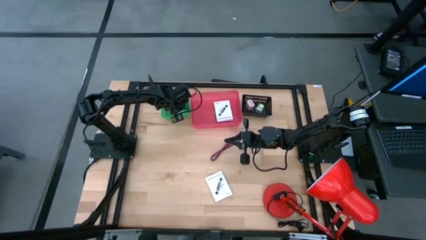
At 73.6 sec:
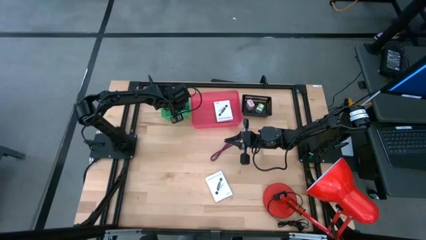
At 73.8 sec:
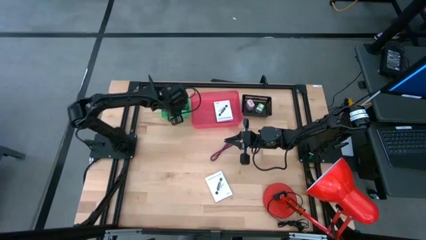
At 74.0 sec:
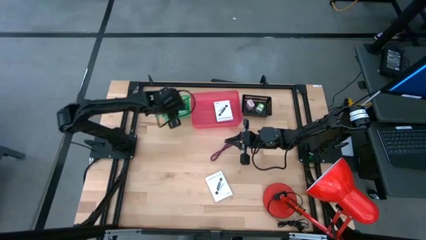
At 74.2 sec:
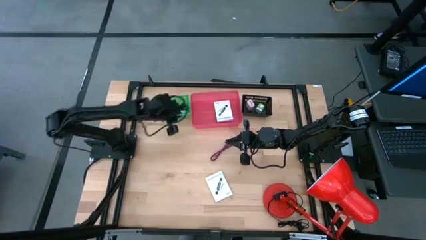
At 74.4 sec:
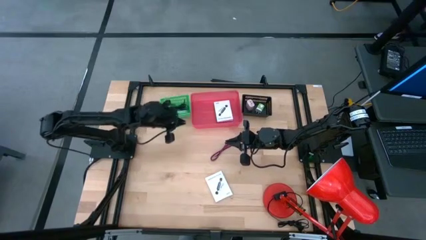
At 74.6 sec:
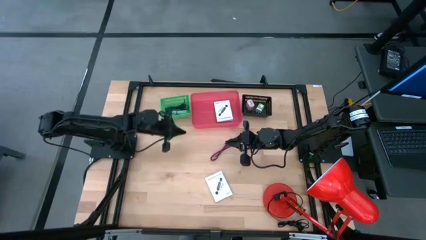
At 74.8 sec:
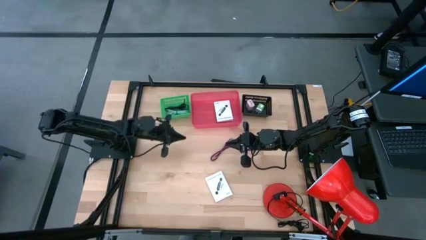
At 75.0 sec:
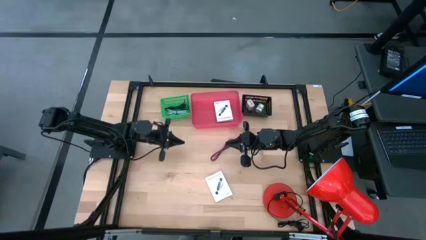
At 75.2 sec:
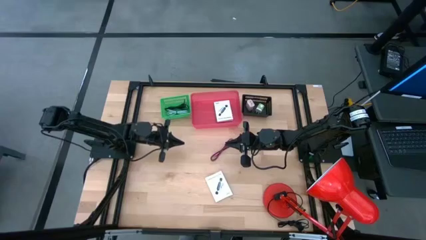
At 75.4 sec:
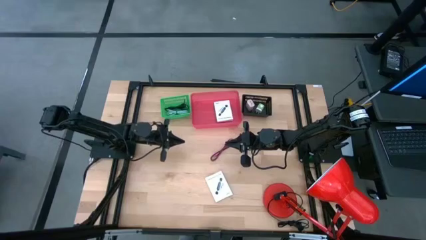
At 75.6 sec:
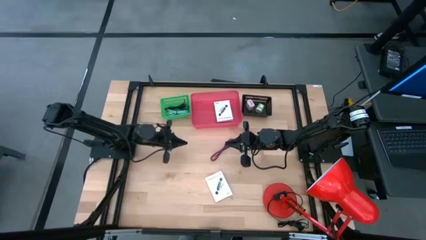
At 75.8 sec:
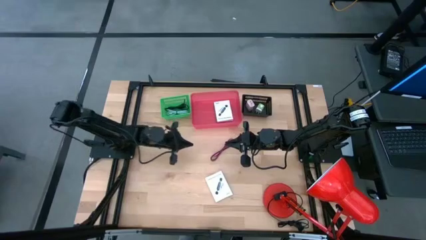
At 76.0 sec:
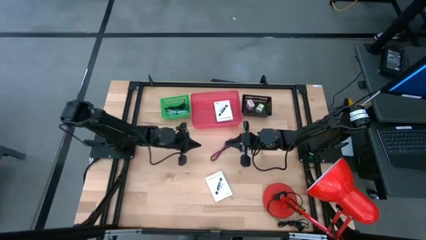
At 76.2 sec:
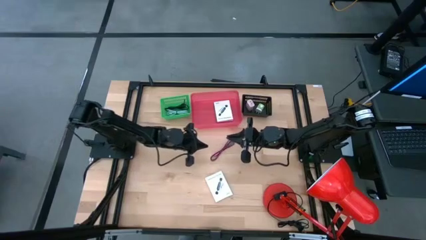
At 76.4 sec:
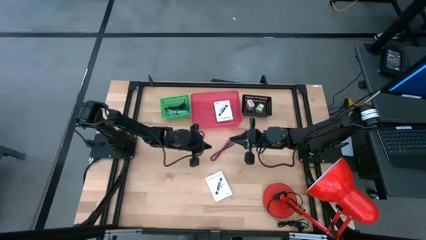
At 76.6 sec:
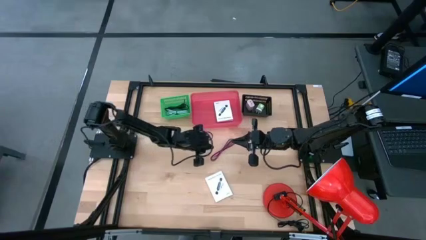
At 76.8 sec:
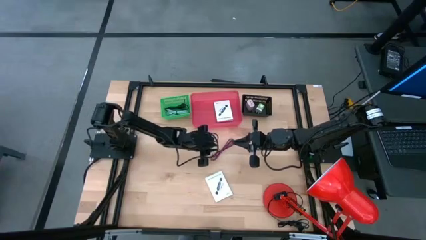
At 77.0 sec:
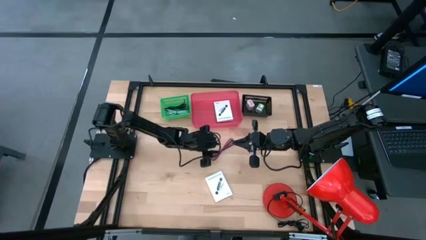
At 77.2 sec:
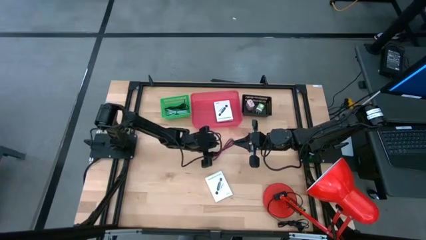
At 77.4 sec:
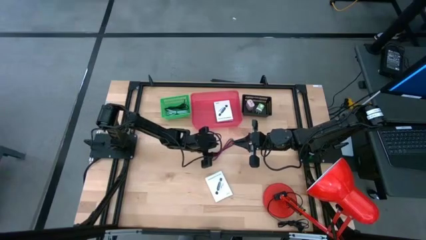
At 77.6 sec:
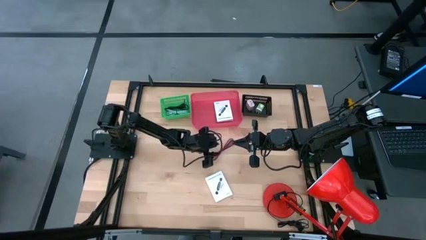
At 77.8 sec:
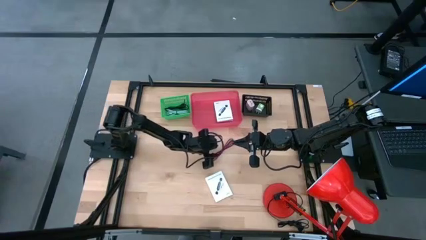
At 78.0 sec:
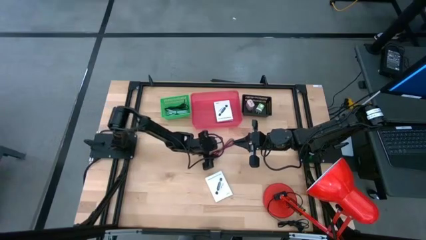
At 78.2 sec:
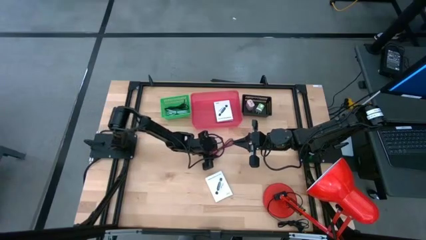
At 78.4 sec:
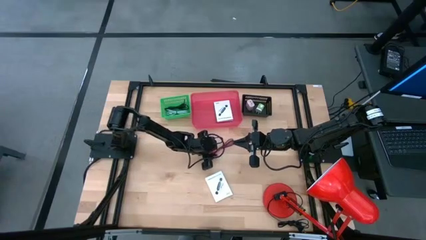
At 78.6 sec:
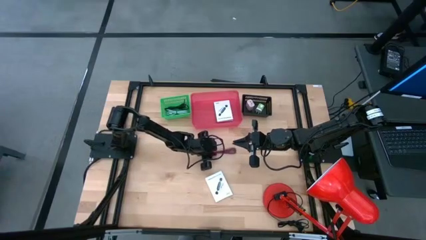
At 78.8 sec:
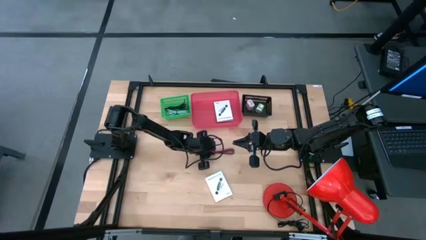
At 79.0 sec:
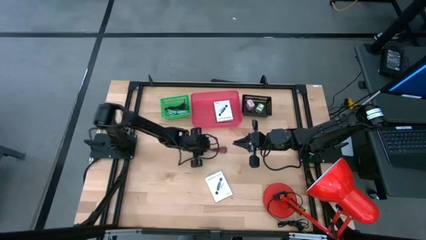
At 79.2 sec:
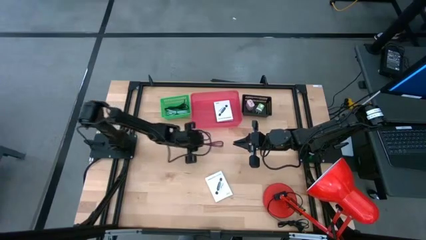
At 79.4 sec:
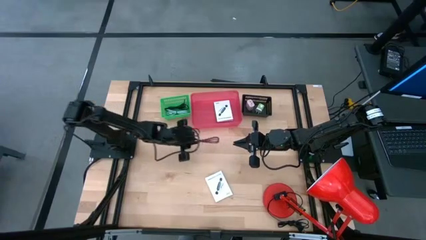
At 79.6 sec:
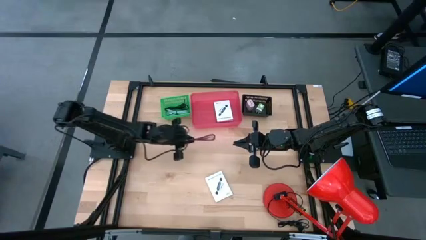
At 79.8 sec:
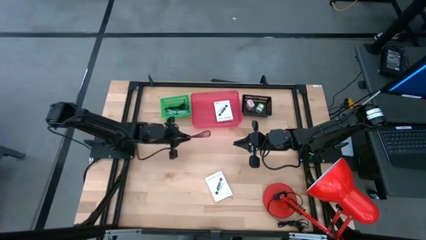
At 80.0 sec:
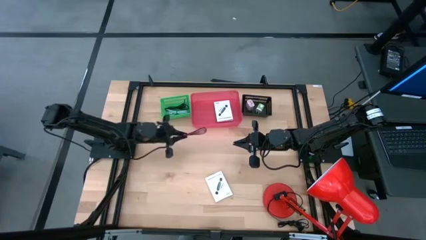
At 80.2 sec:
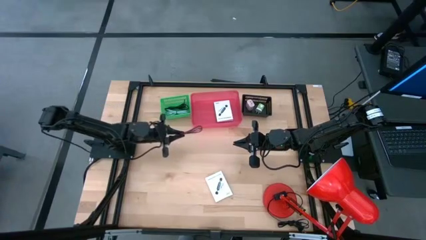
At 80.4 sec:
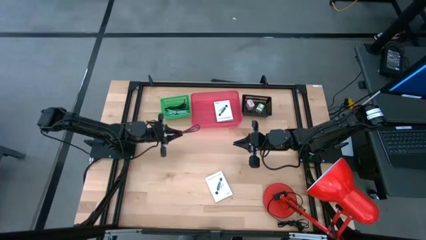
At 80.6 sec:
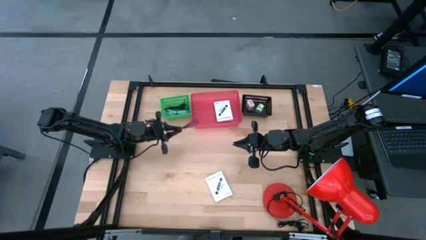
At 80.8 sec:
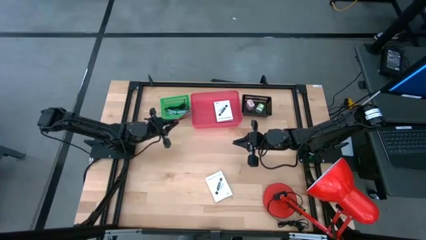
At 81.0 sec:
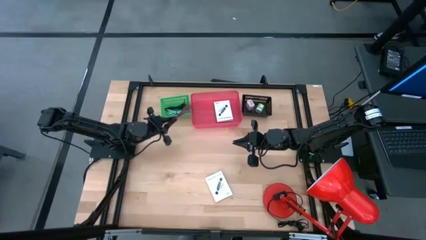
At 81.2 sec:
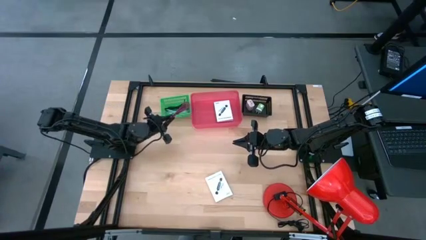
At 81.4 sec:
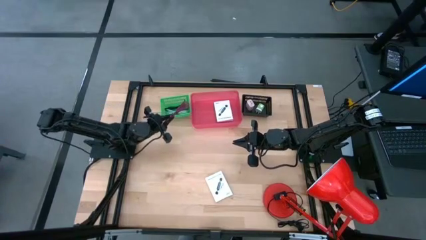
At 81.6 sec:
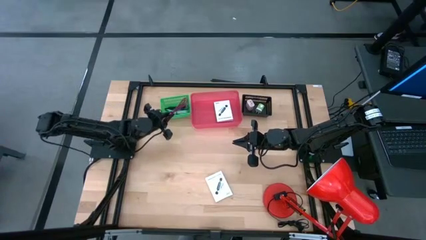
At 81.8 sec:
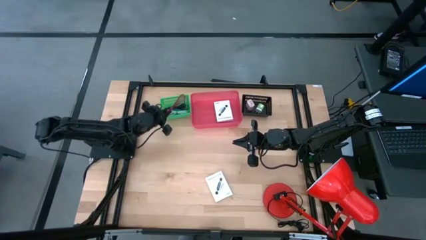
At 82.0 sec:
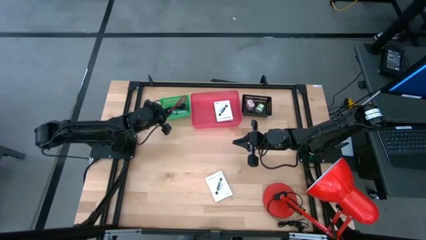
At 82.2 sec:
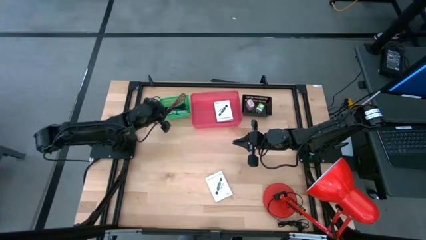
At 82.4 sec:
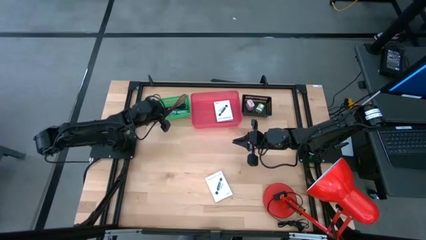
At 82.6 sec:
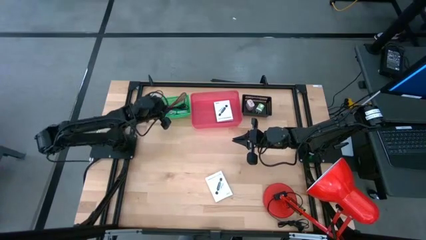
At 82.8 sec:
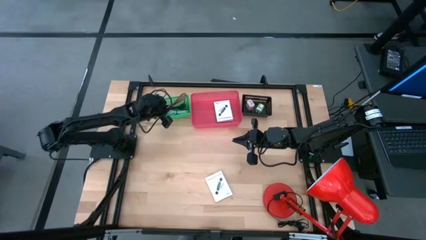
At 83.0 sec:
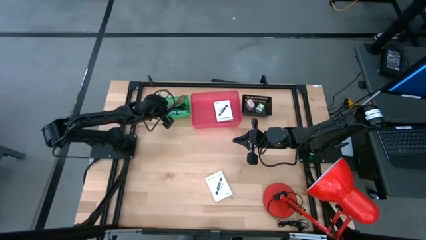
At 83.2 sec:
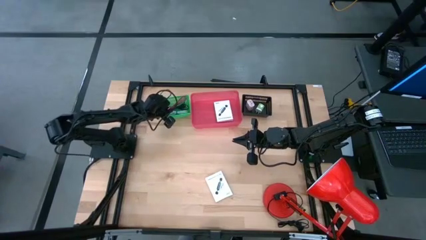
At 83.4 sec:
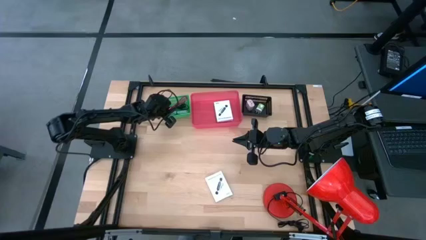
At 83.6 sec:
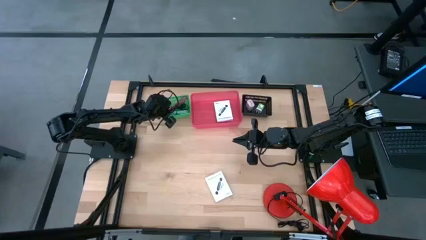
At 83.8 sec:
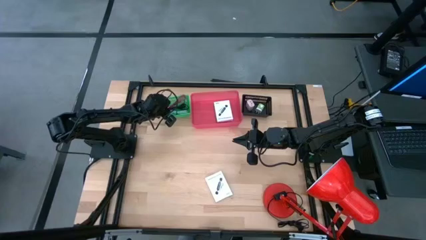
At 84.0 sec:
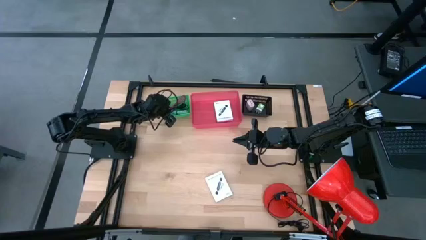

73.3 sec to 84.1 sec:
Task: Pick and place items into bin
Put the pink charger cable into the green bin

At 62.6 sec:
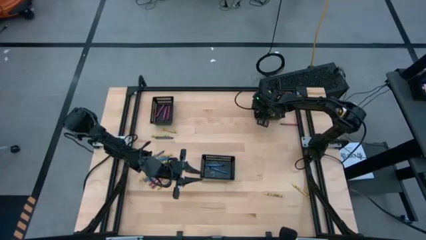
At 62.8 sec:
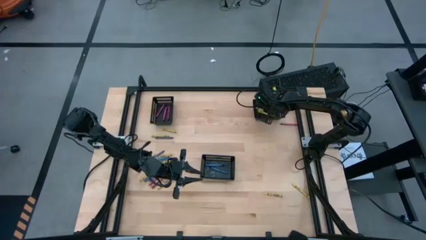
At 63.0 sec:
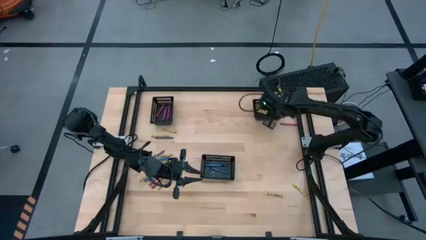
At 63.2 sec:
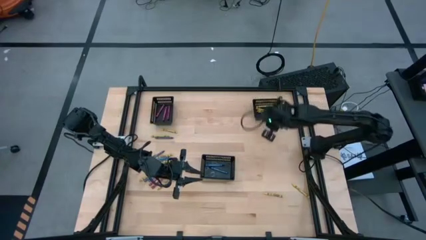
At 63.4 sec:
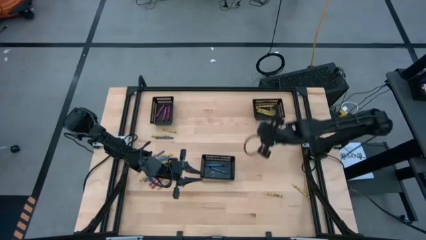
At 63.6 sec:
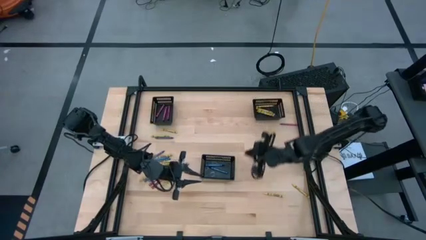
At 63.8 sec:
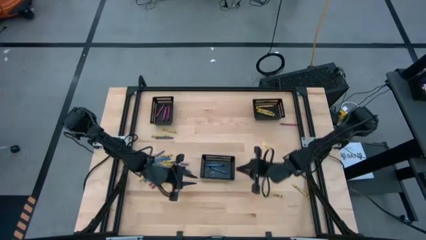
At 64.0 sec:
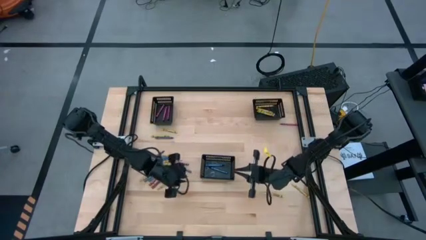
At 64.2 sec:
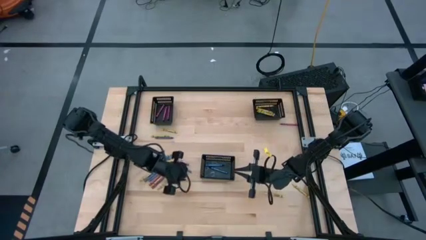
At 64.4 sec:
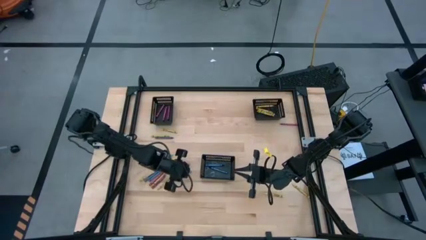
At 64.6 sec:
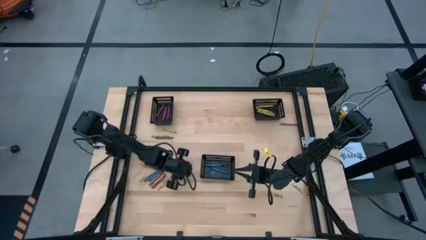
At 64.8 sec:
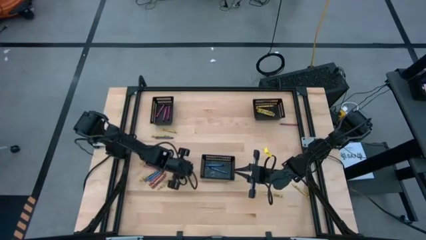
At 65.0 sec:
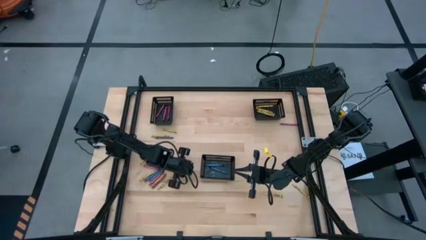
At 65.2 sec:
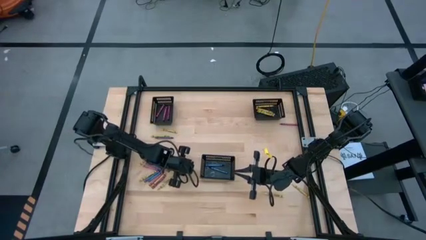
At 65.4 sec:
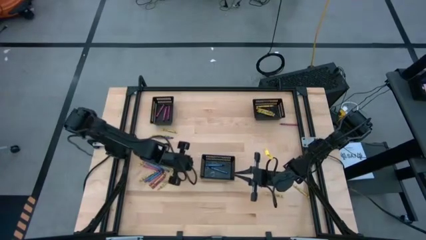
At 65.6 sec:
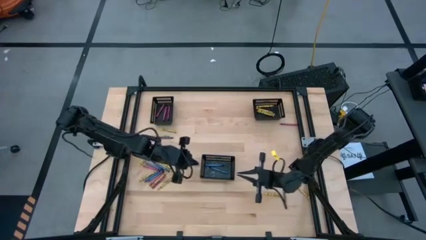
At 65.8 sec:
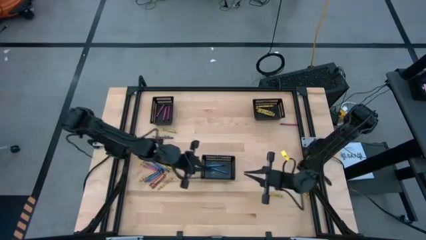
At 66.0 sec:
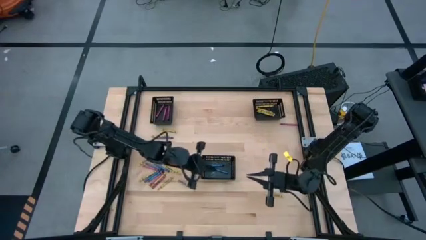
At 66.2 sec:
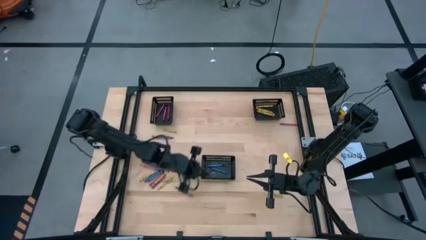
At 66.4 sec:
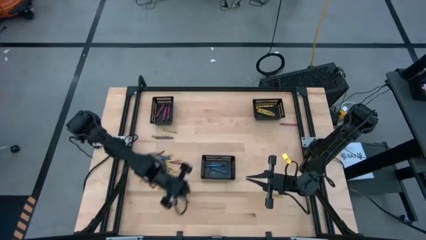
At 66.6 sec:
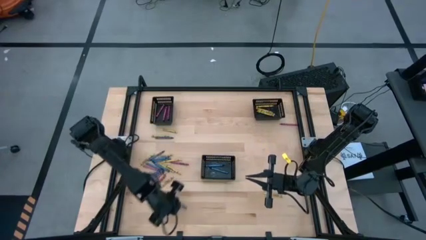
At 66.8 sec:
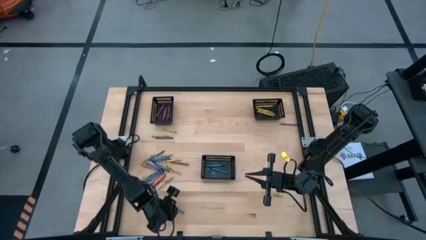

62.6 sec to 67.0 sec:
Task: Sort crayons
Put the blue crayon into the bottom black bin
